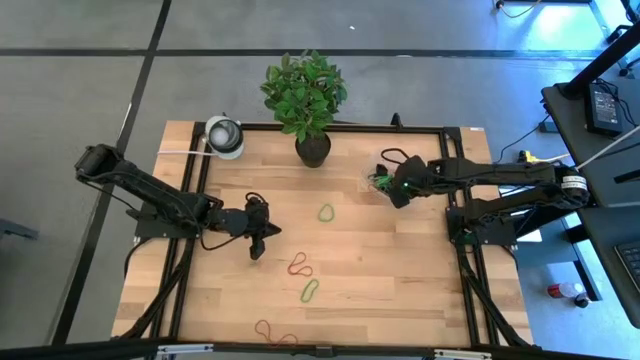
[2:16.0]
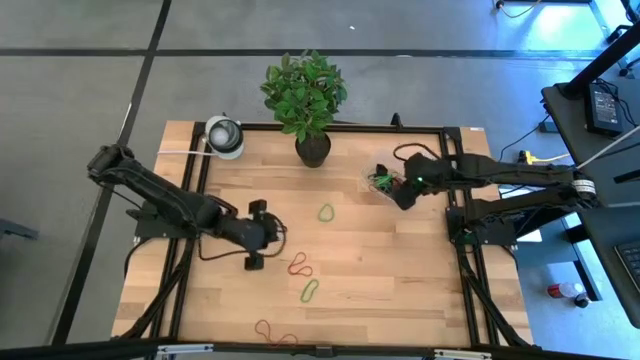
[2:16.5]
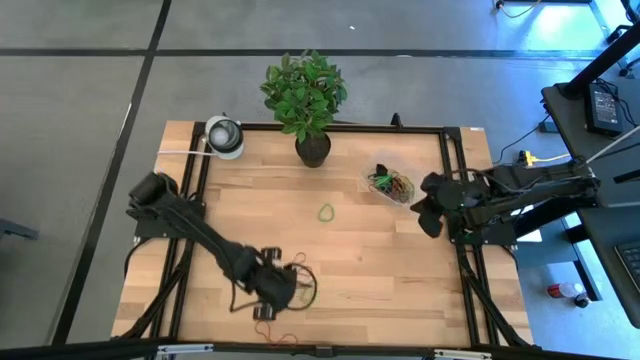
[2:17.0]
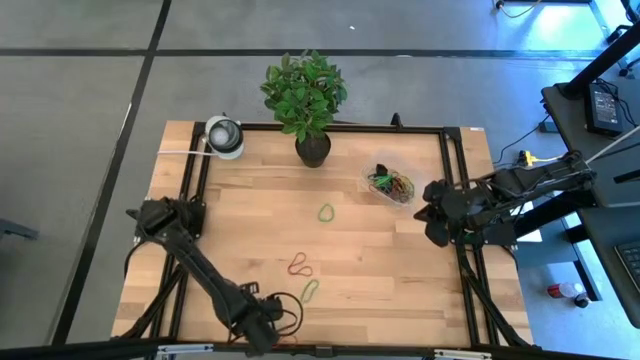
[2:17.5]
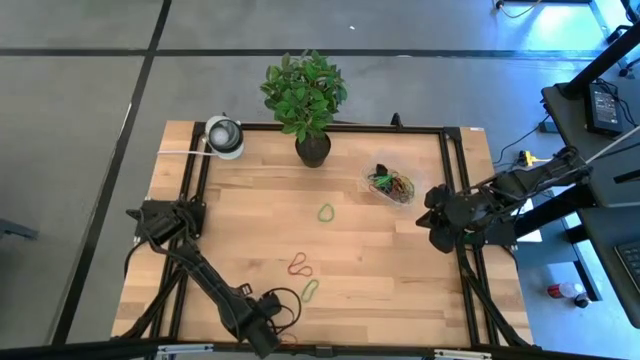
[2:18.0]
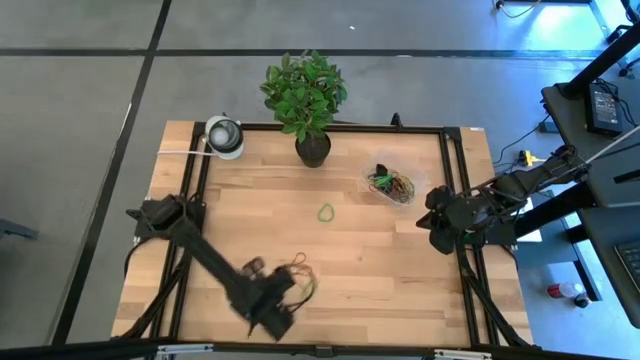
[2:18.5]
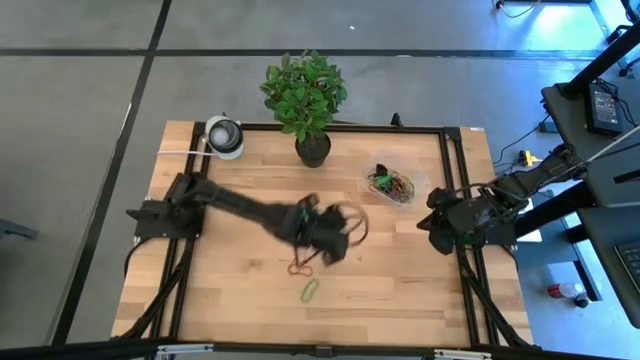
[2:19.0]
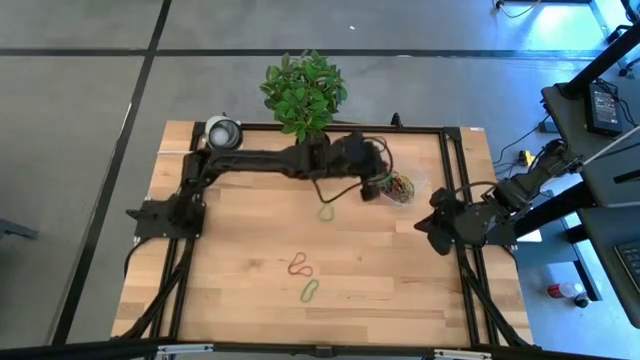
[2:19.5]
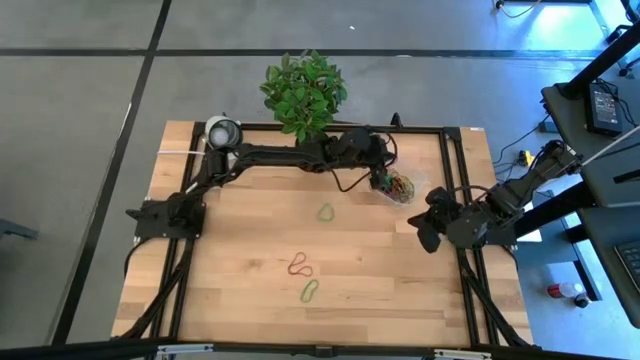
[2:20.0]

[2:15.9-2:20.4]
Task: Pick and place rubber bands into bin
Put the bottom red rubber band into the bin

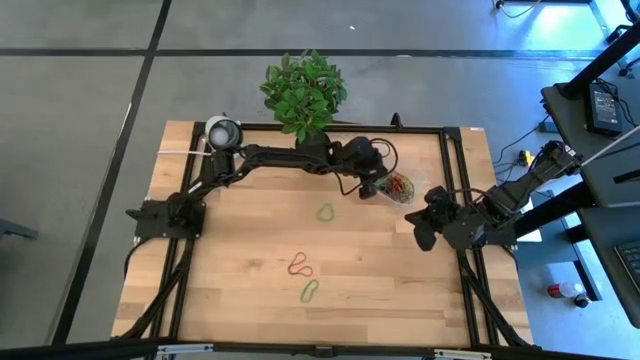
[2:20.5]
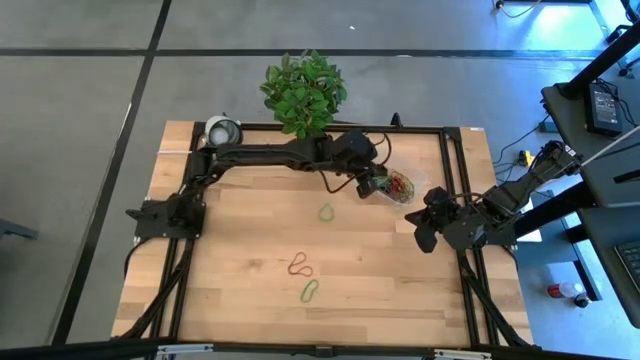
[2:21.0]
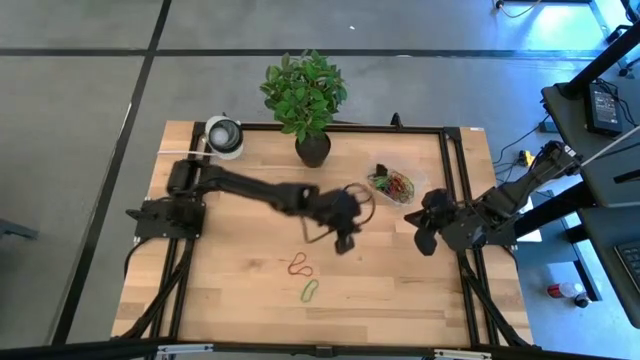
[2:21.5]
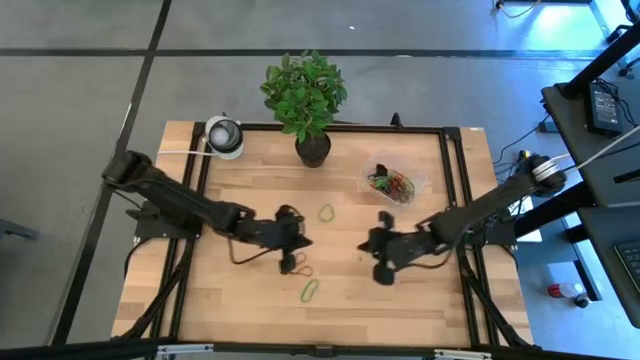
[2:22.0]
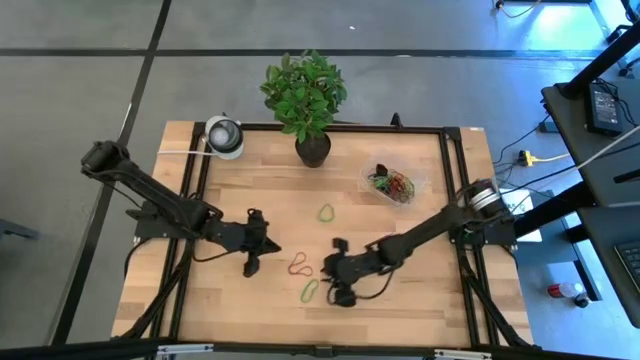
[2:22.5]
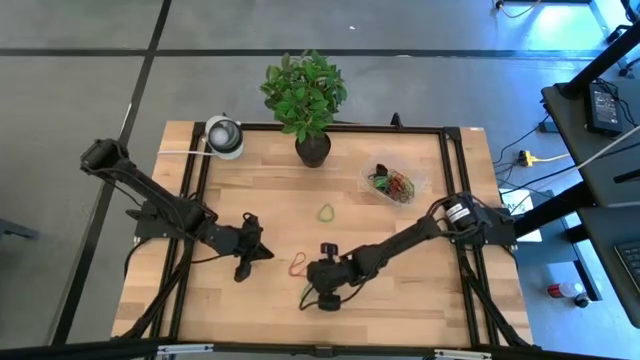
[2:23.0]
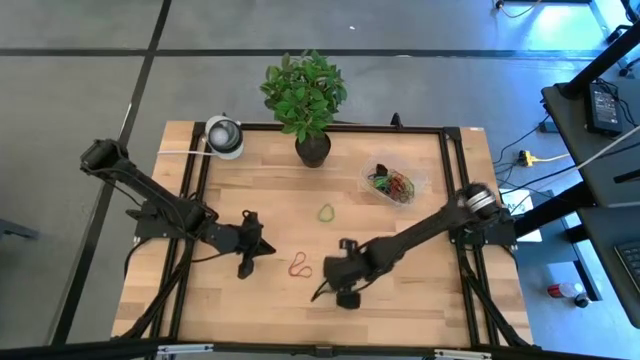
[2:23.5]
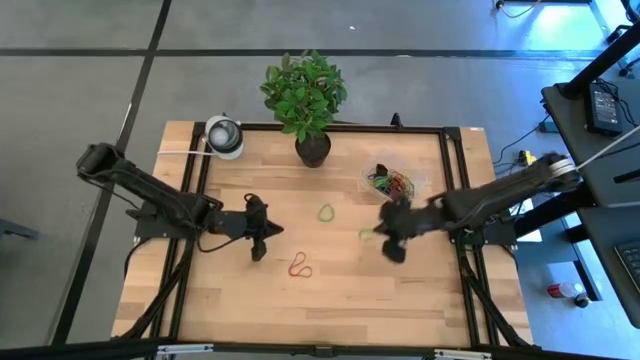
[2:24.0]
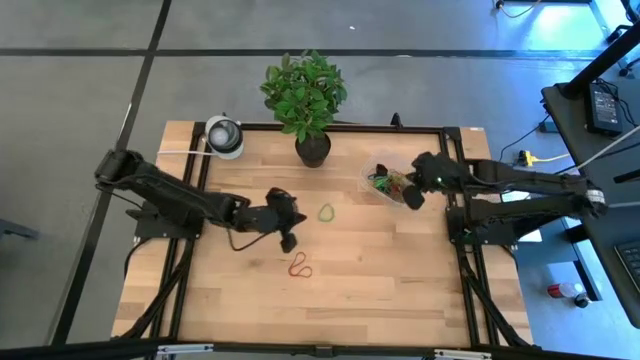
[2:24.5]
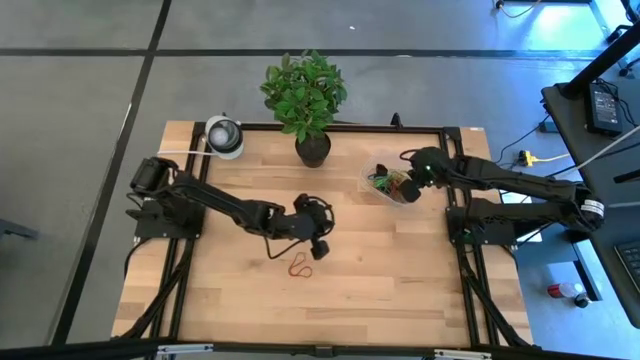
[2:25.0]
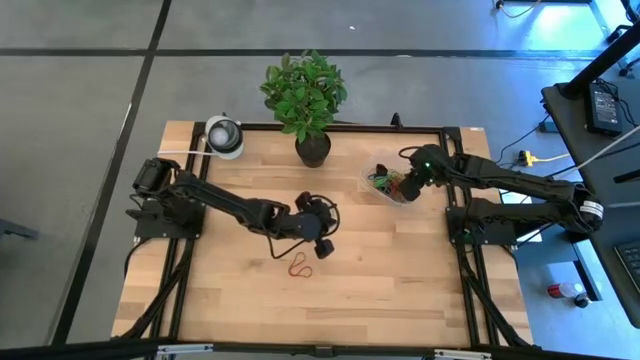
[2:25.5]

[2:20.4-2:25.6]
Put the bottom green rubber band into the bin

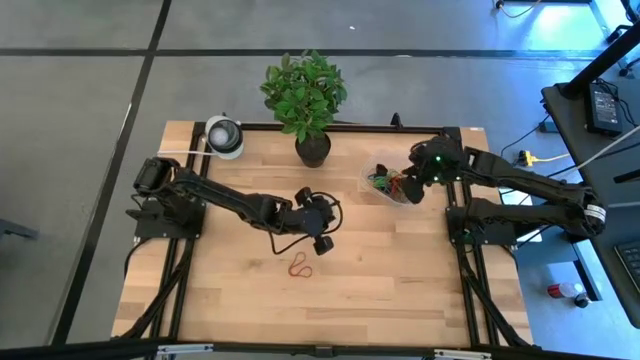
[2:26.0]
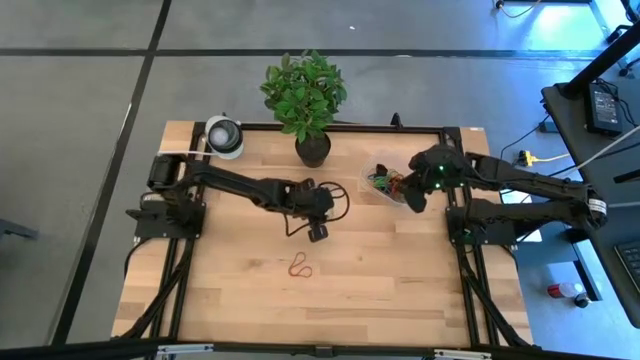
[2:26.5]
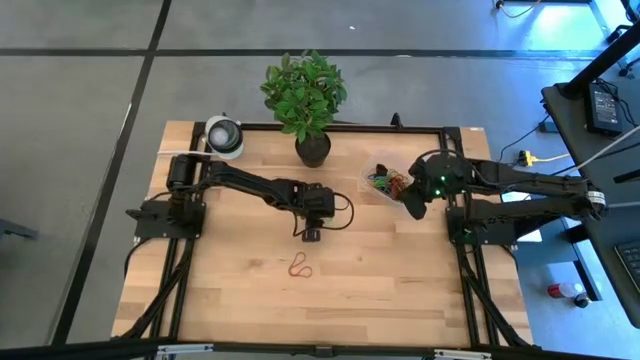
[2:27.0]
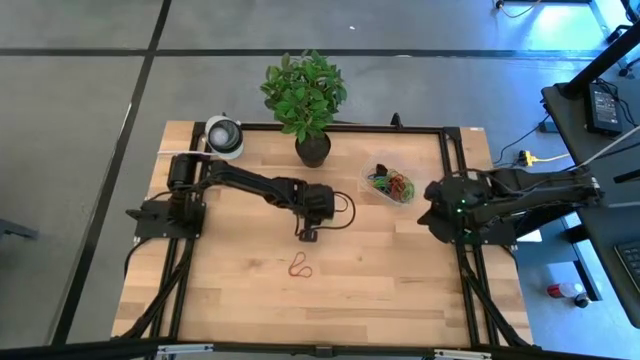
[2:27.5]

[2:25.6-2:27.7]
Put the green rubber band into the bin

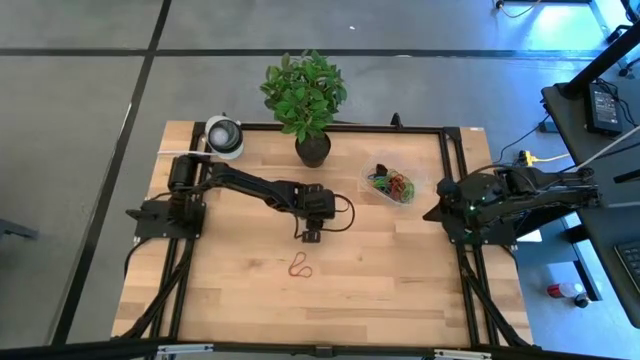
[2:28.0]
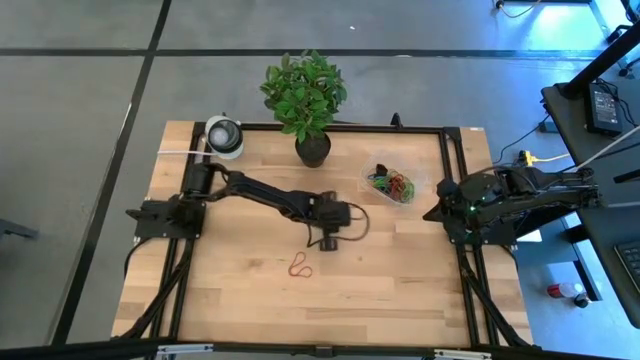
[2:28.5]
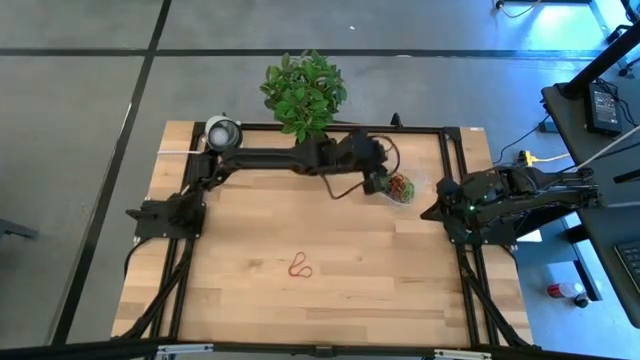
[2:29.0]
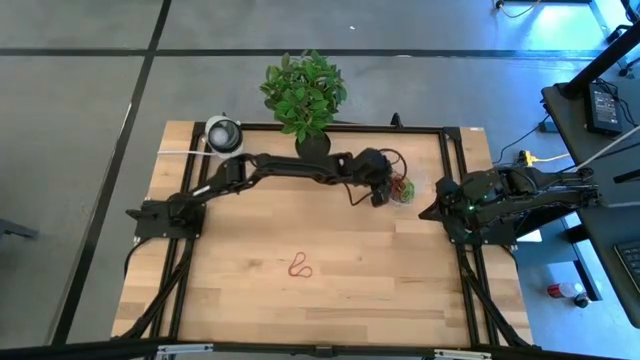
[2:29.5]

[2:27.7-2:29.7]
Put the green rubber band into the bin

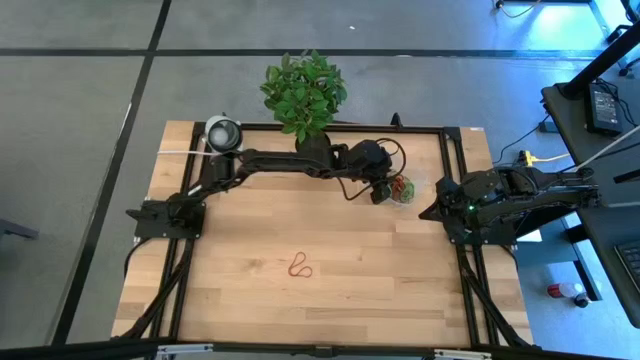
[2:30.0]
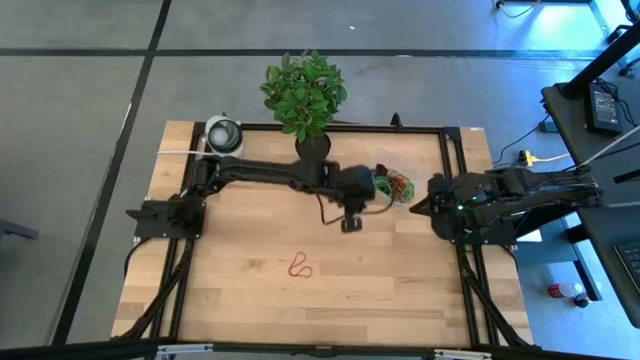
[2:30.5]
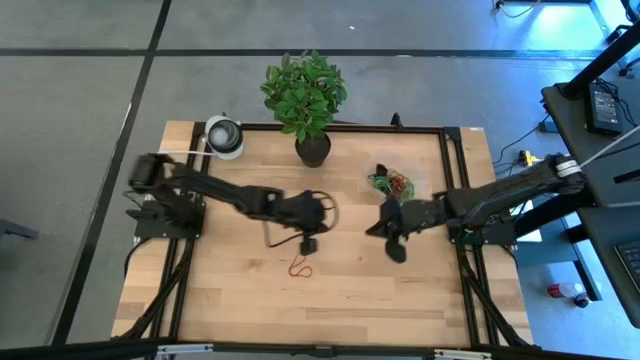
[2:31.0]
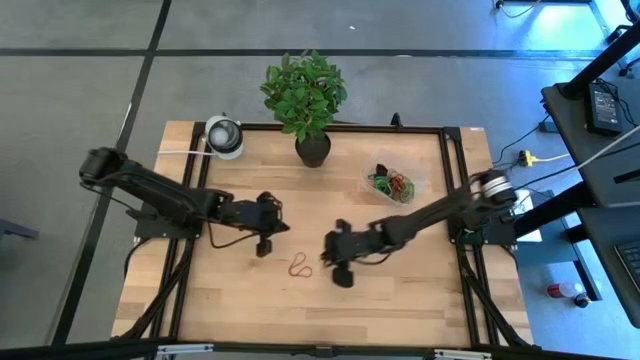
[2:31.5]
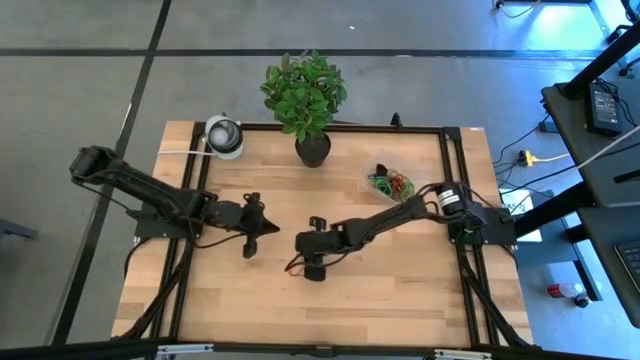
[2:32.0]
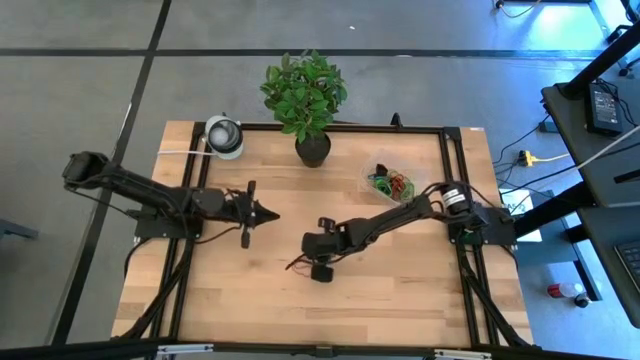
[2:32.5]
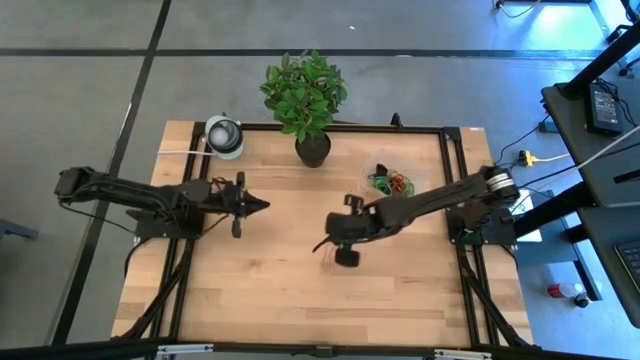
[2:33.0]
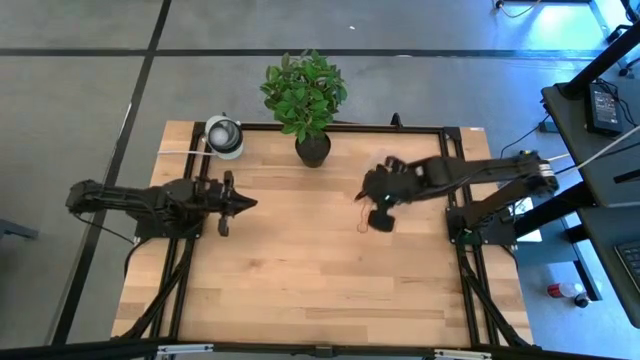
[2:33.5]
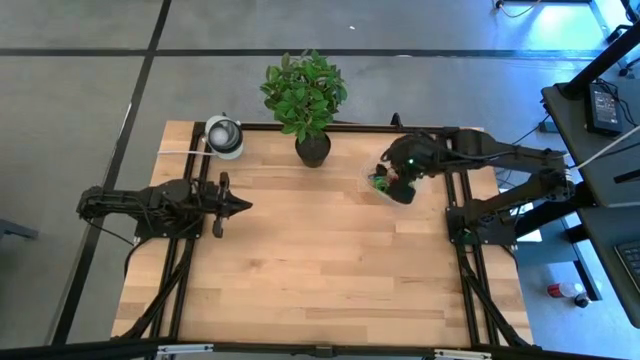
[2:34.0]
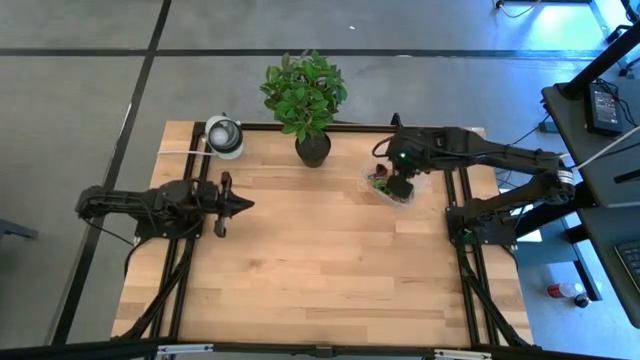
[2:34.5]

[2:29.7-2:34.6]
Put the red rubber band into the bin
